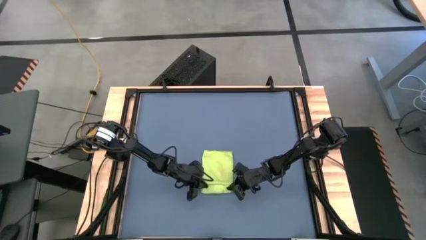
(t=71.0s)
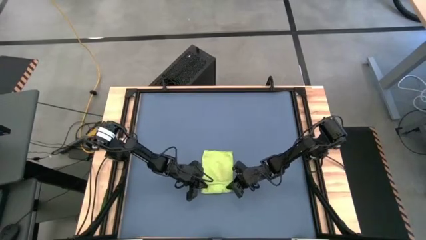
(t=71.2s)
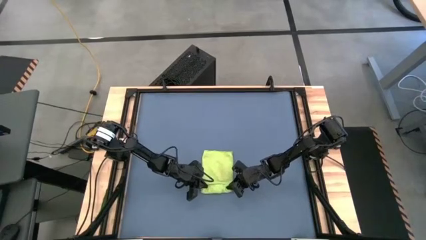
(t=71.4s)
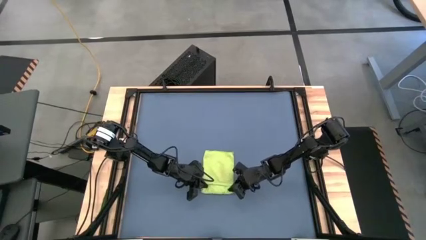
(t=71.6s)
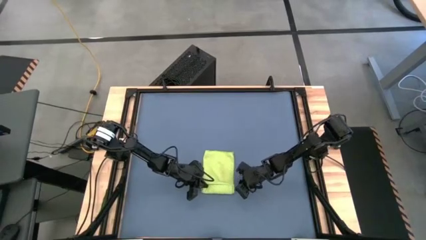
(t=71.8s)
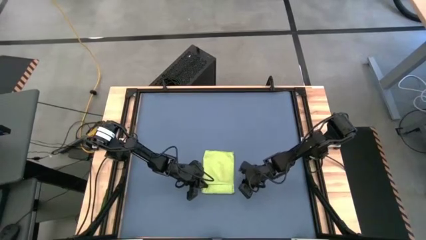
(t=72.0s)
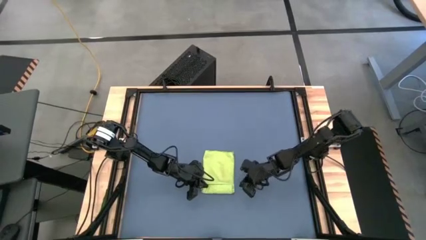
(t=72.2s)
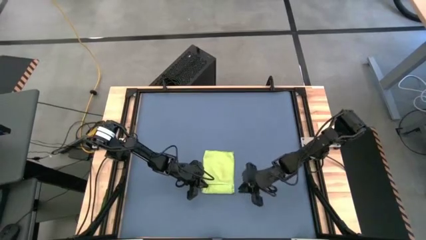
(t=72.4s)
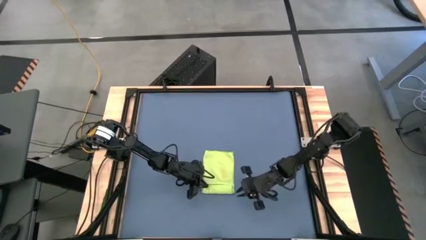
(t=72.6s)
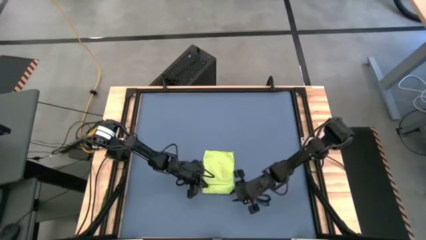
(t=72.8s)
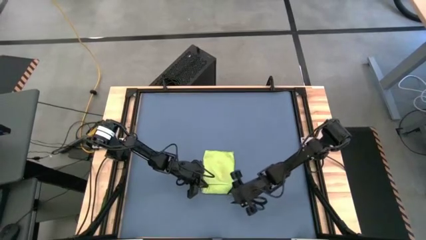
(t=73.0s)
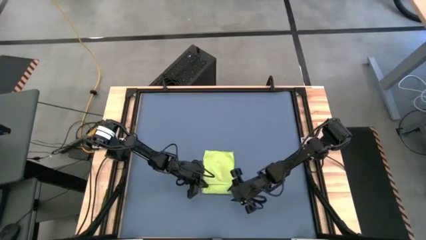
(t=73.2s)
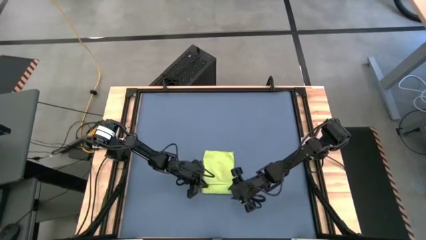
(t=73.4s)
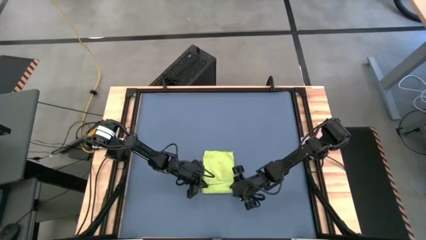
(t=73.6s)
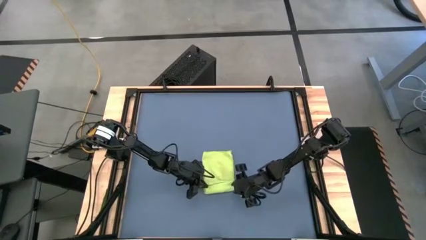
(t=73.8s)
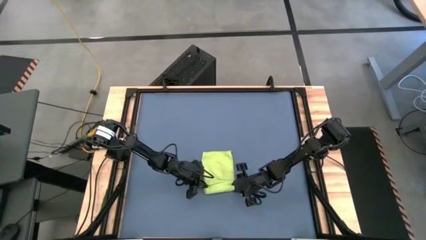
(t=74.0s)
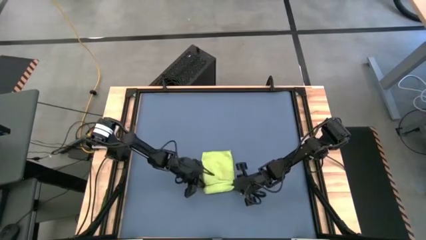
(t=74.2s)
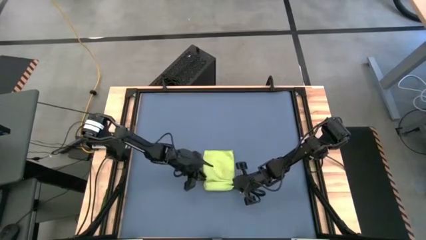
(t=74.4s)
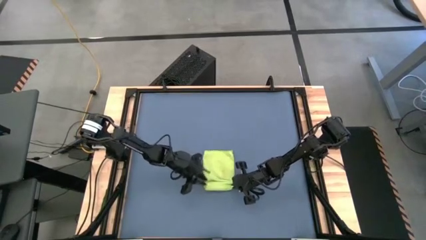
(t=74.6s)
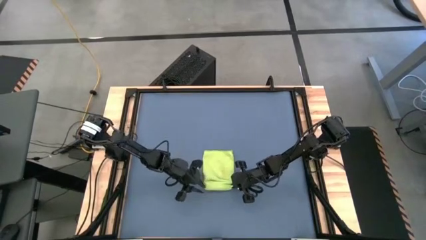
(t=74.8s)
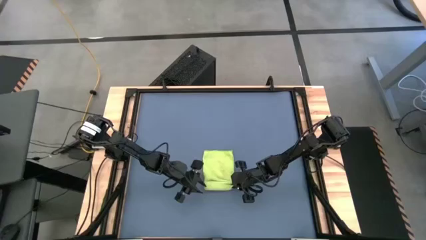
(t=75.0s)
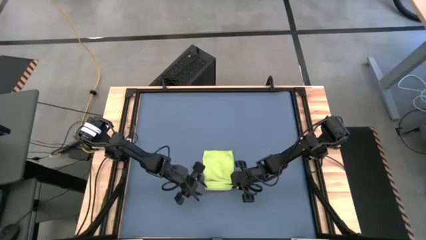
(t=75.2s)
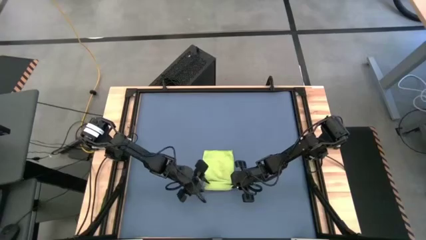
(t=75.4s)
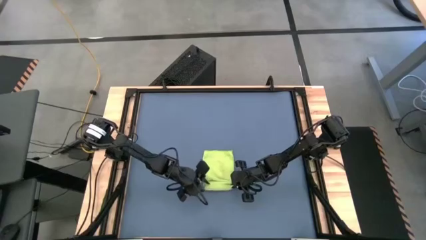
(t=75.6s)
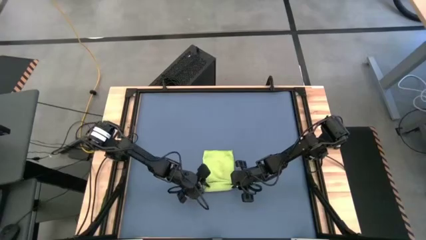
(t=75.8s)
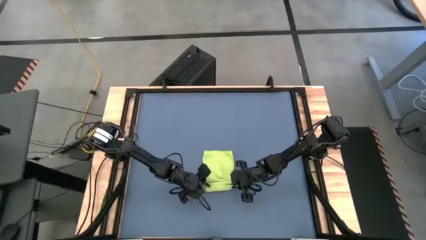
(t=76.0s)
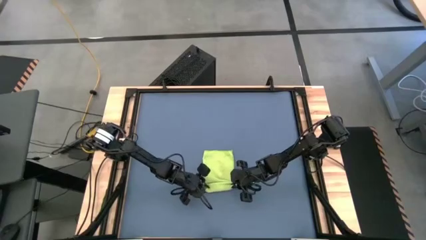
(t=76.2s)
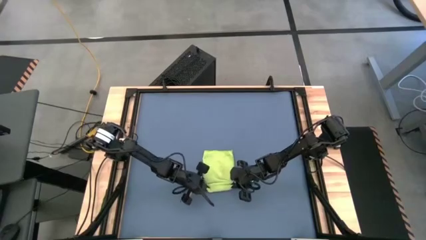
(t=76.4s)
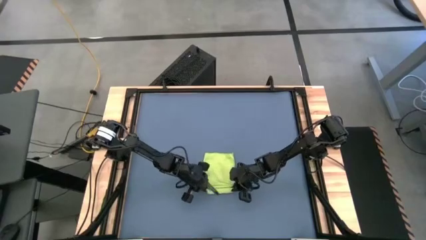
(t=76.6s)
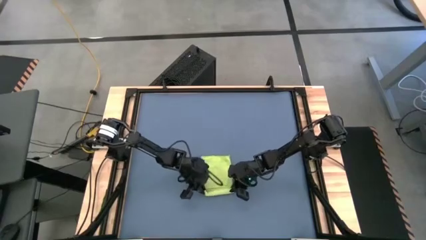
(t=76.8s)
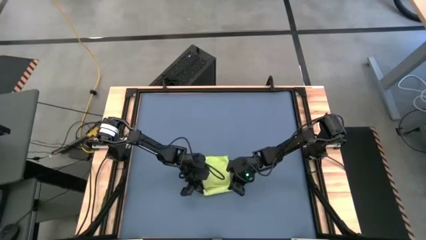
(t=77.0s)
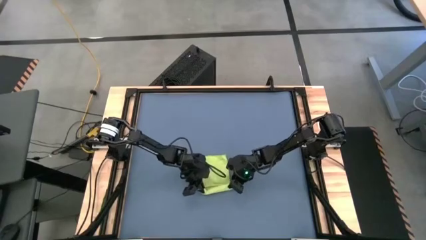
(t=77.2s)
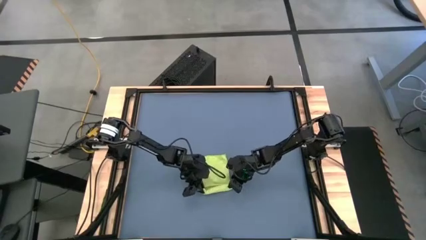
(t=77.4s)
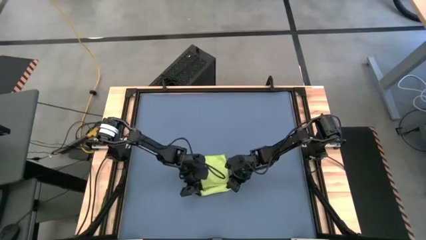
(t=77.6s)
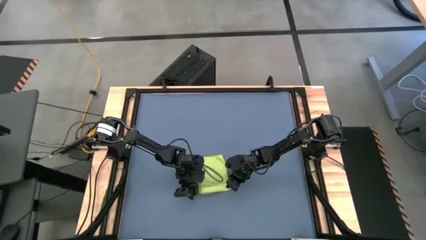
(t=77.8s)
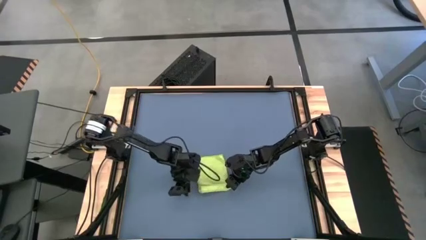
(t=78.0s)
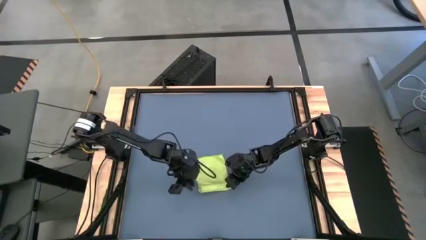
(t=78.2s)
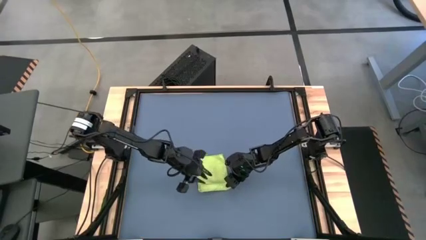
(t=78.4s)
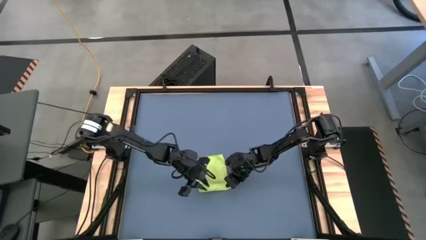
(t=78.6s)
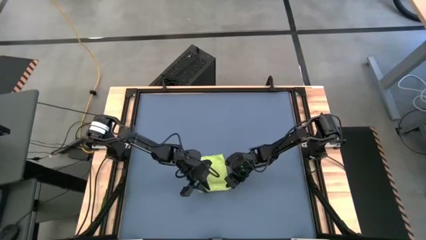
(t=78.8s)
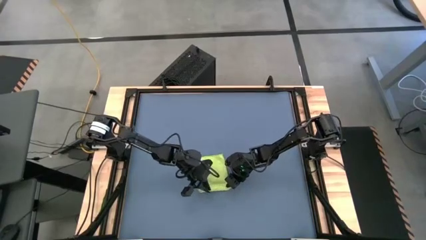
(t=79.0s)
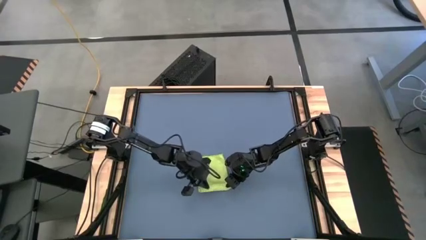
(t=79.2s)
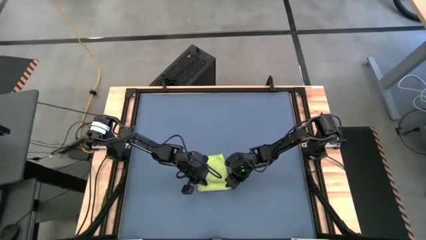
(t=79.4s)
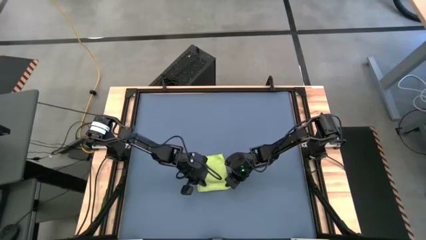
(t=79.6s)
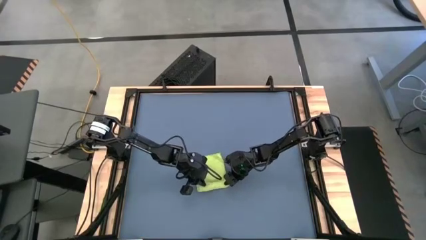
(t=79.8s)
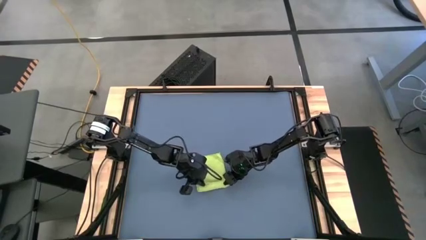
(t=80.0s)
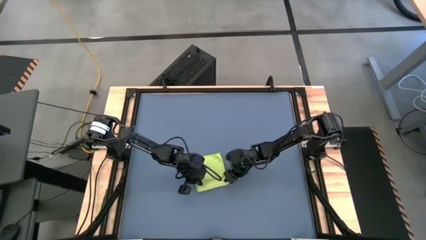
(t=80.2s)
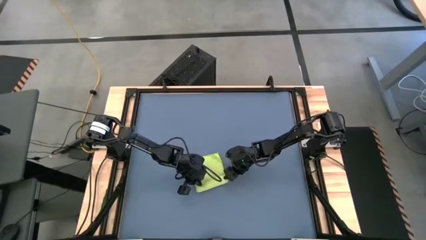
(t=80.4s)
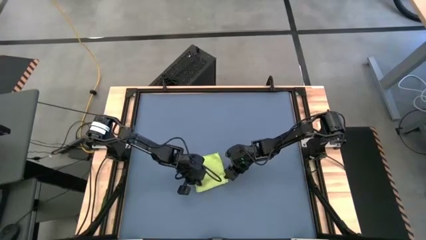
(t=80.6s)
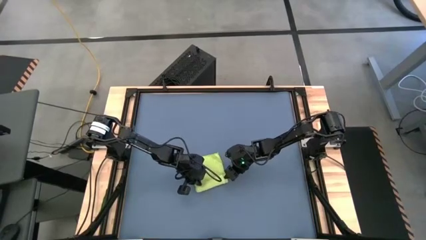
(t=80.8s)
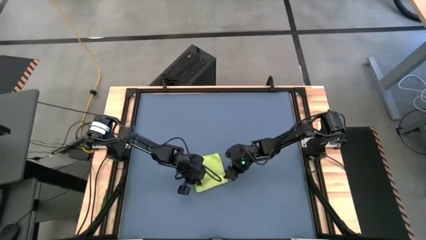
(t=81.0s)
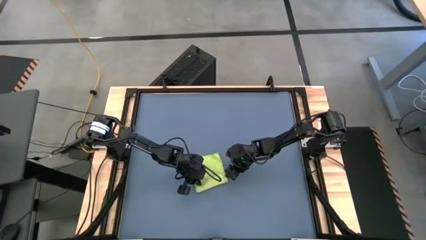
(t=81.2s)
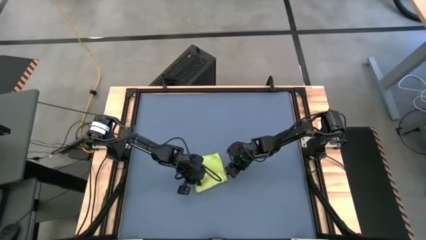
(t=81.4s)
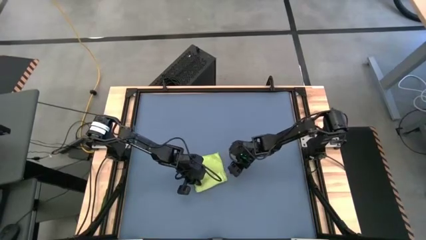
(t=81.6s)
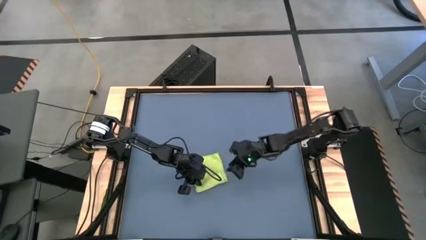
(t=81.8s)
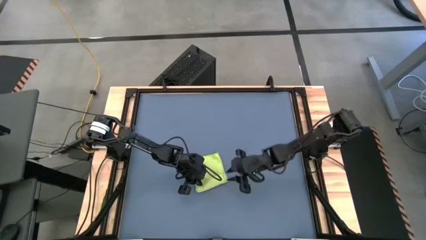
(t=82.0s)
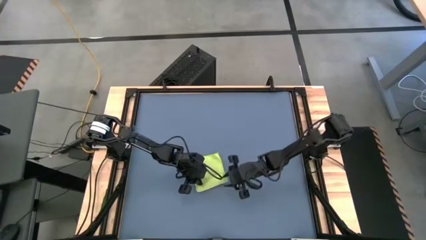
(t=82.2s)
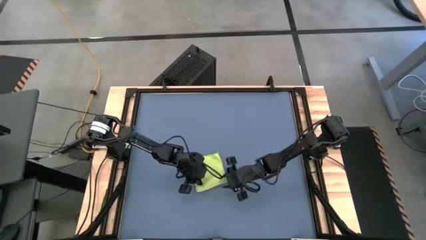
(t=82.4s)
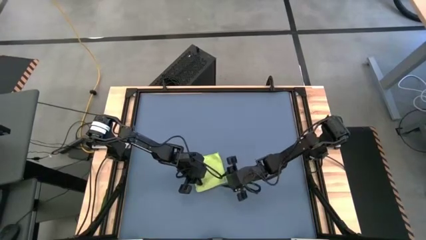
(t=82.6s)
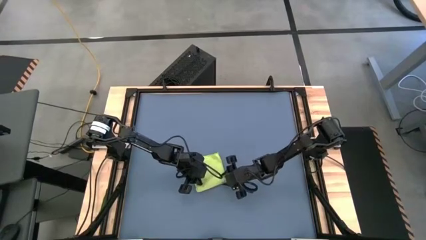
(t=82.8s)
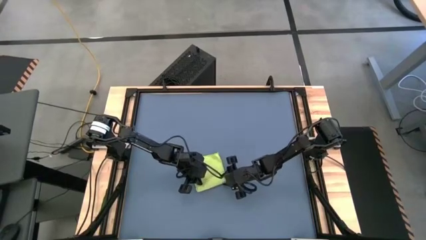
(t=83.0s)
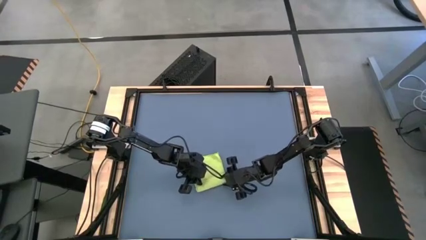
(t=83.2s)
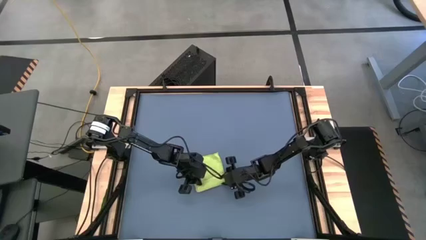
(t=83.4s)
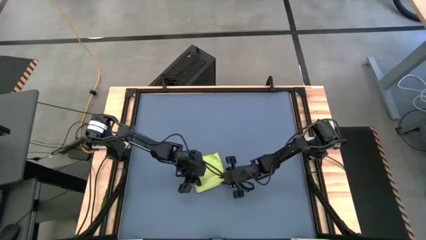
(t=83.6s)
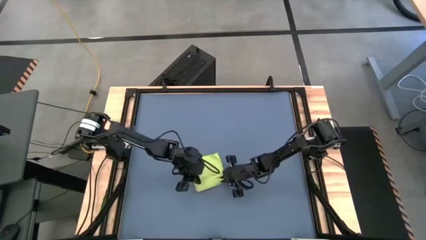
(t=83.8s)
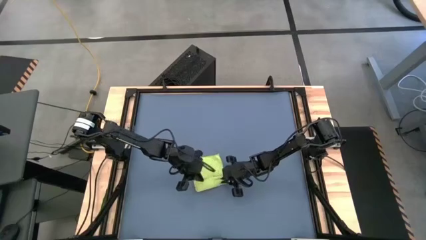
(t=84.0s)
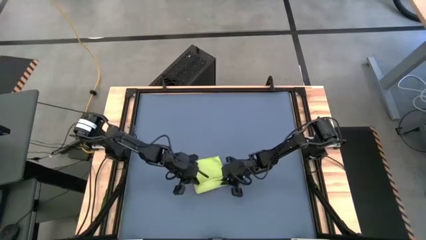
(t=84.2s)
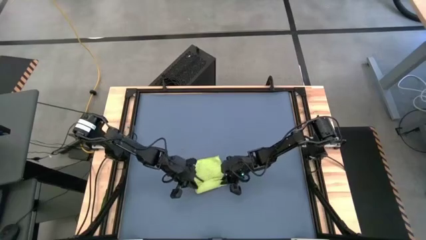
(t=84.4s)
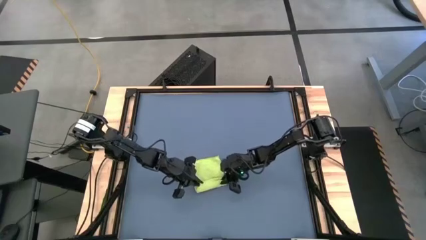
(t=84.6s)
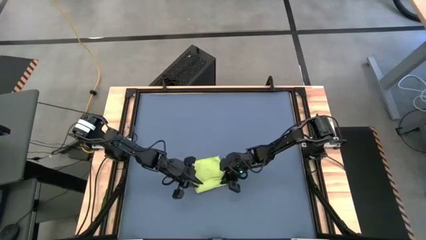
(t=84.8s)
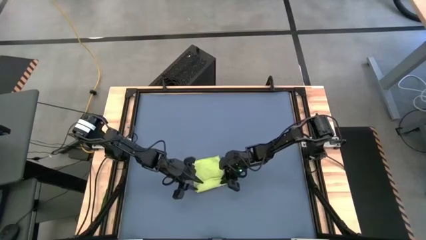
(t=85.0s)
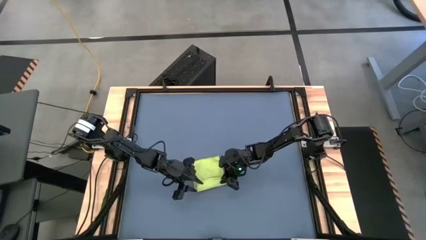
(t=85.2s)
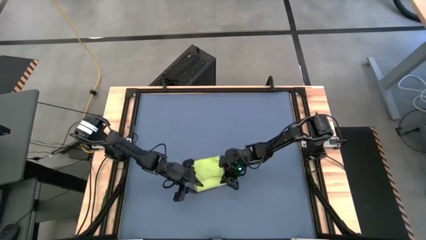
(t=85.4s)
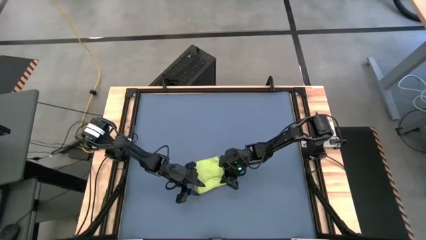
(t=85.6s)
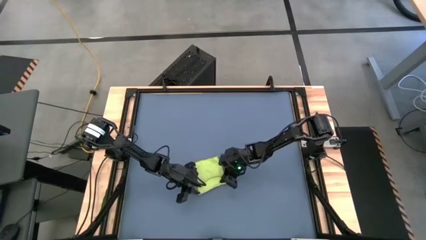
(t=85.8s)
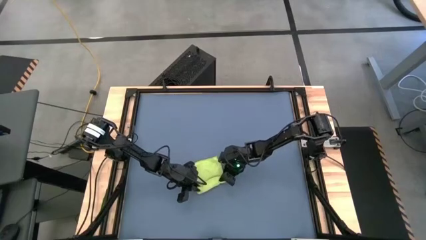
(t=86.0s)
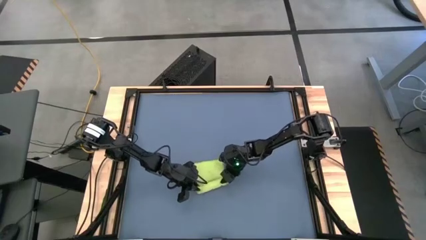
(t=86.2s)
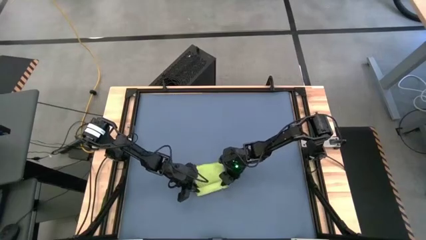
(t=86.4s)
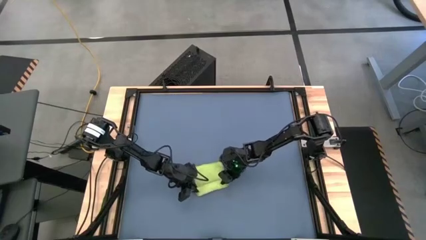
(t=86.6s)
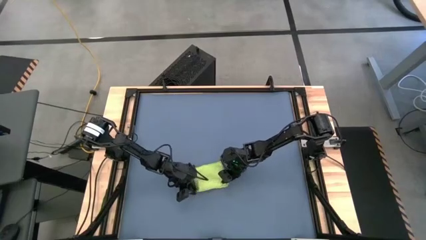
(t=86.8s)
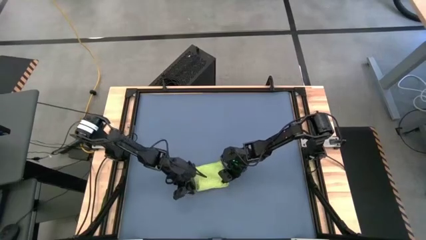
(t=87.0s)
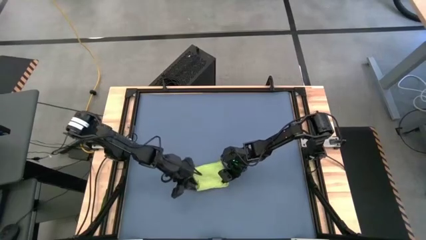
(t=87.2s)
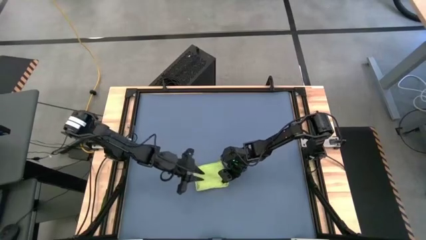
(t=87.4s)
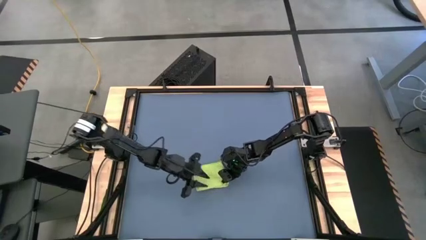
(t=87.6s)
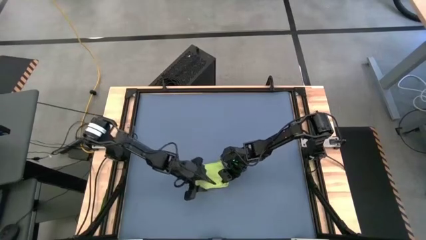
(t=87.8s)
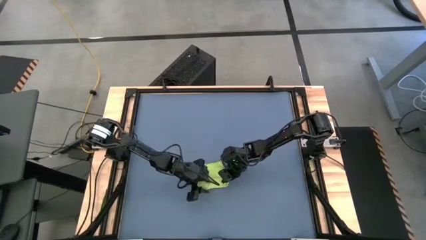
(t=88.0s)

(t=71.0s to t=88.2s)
Task: Roll towel
Roll the green microfiber towel
